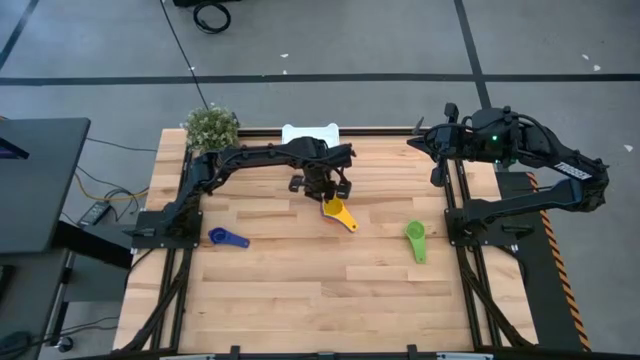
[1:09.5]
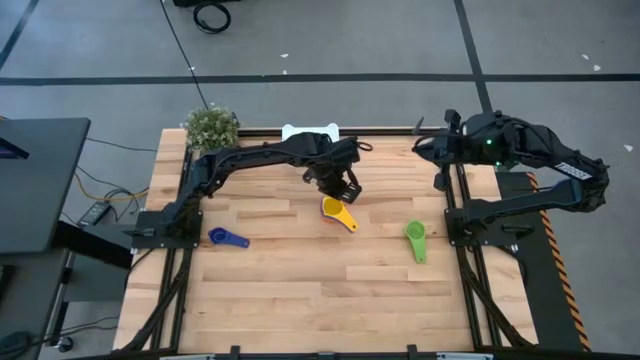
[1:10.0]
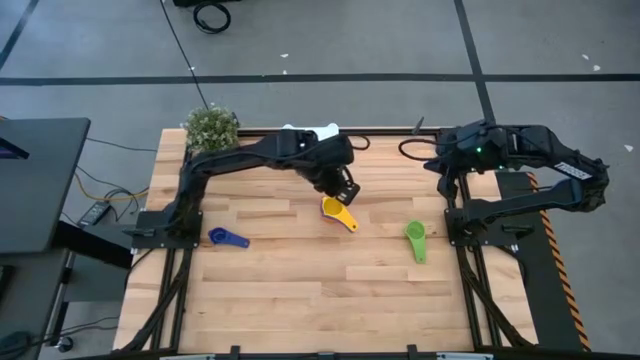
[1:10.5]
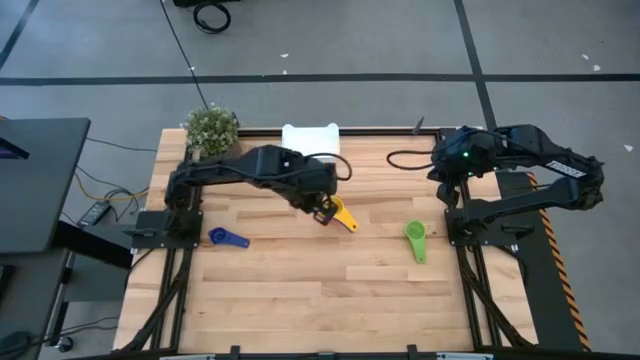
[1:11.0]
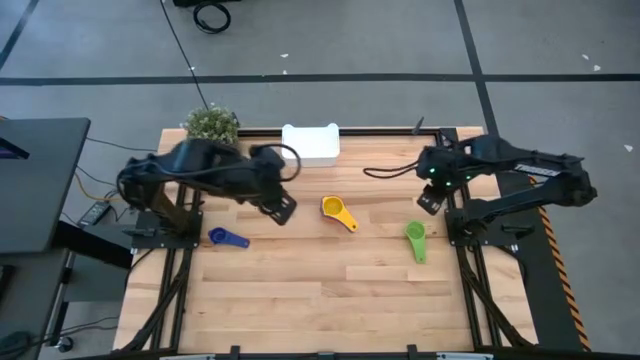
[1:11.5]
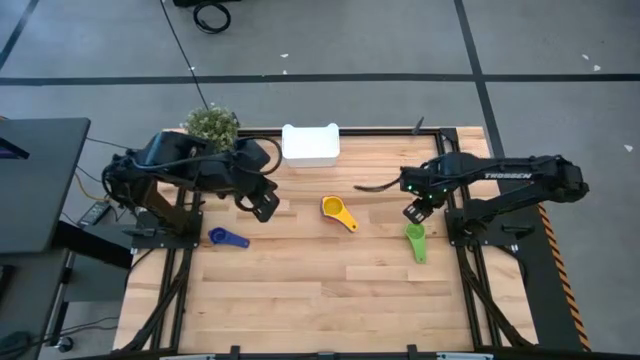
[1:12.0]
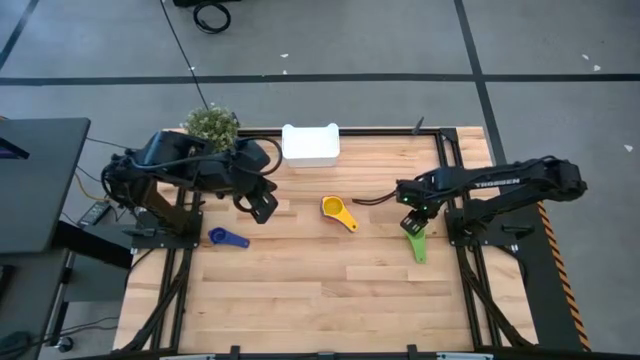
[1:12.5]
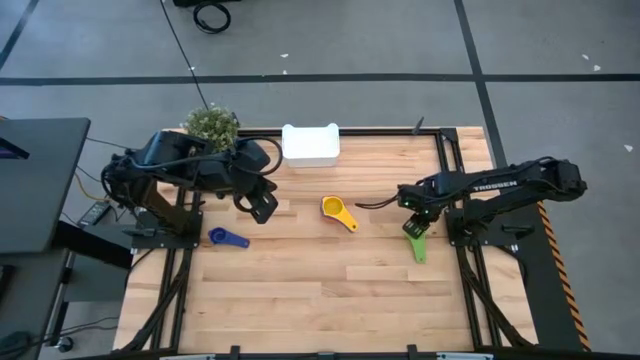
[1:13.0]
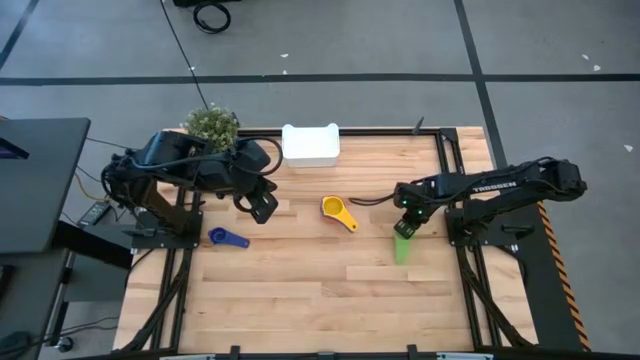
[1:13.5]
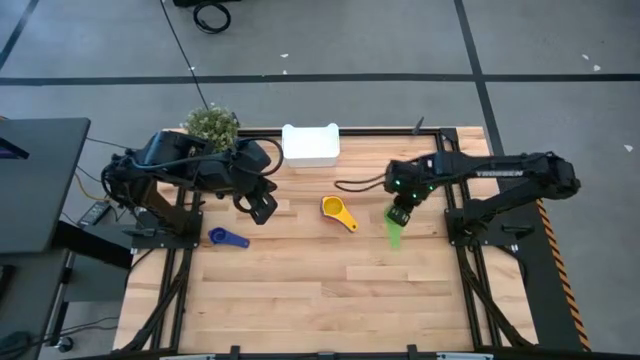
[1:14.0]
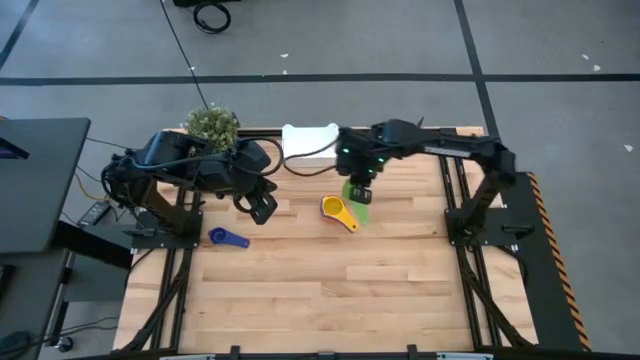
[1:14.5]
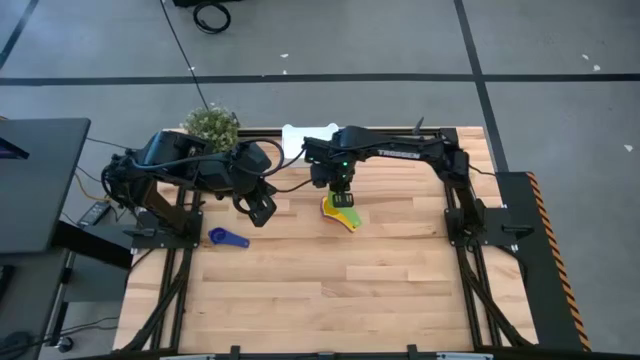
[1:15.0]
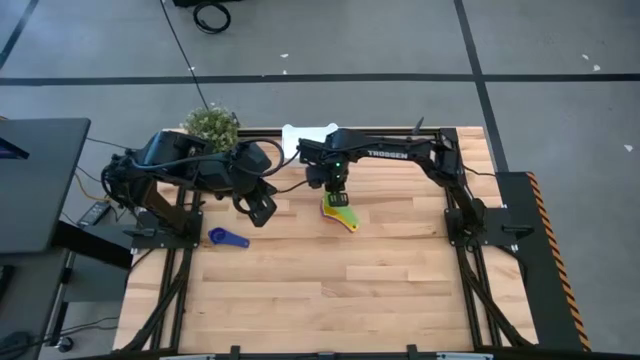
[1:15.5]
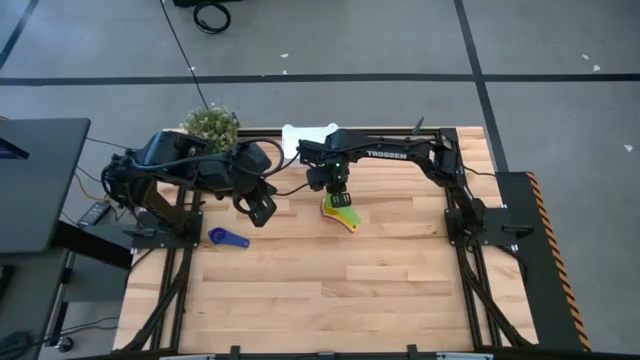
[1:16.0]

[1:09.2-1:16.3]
Task: Nest measuring cups in basket
Stack the green measuring cup on top of the yellow measuring cup

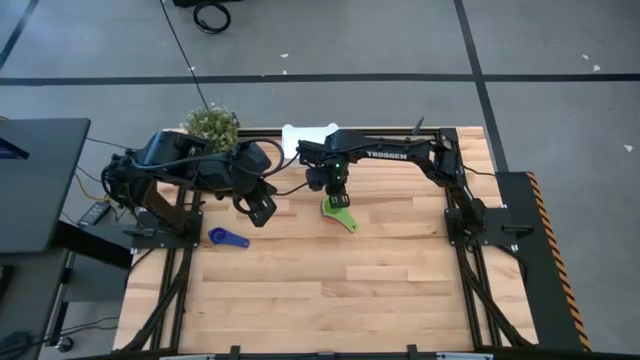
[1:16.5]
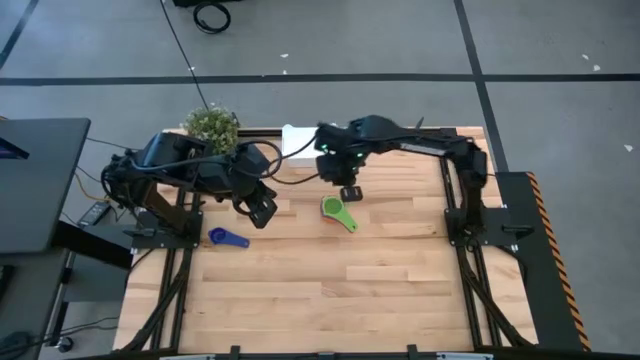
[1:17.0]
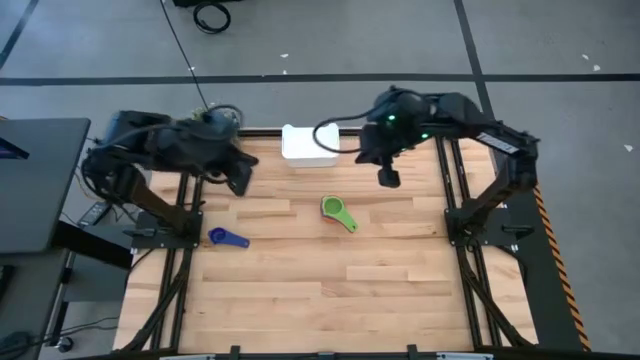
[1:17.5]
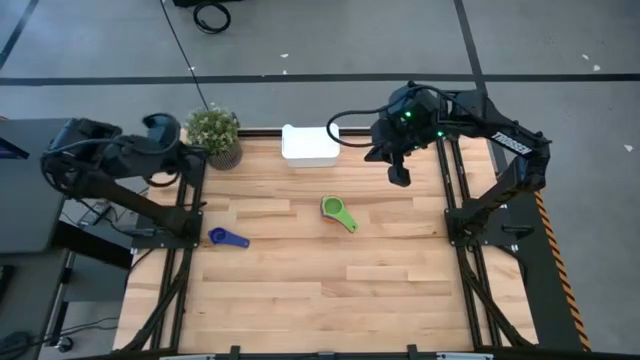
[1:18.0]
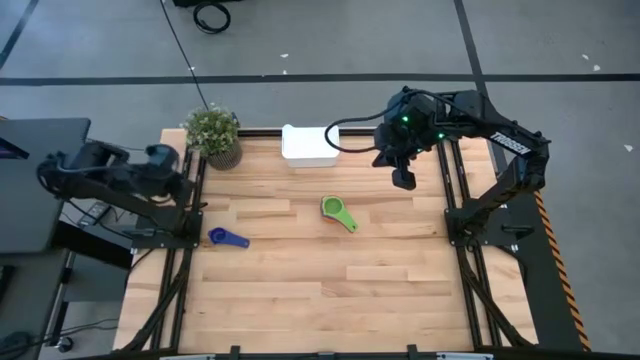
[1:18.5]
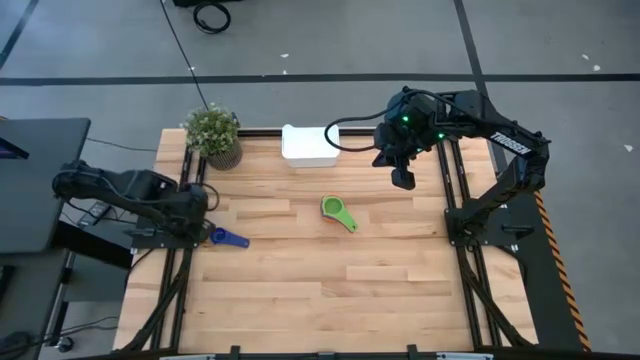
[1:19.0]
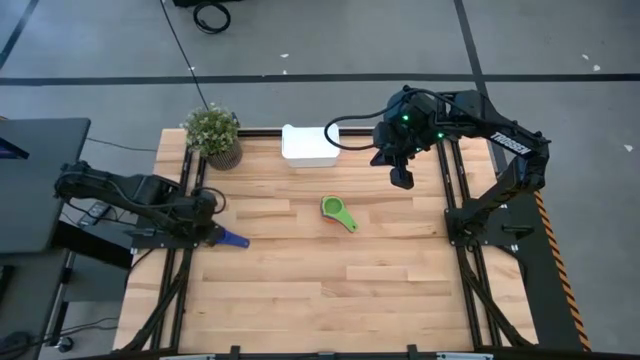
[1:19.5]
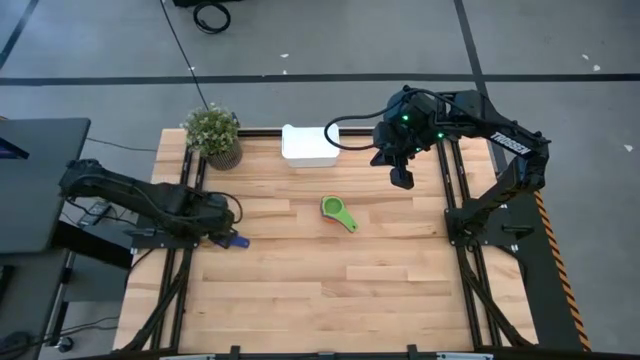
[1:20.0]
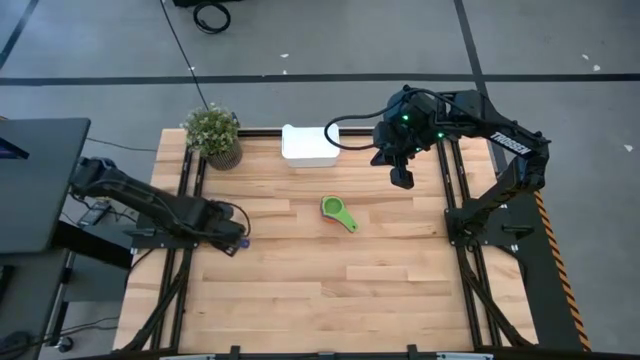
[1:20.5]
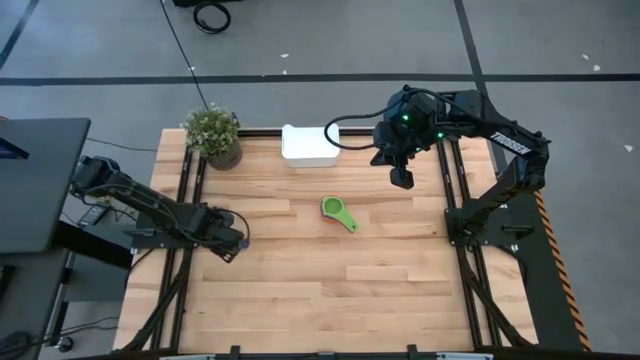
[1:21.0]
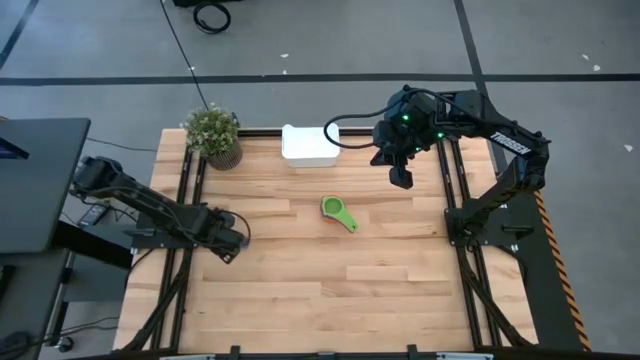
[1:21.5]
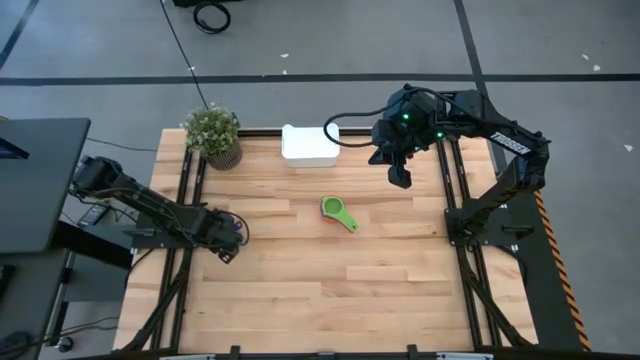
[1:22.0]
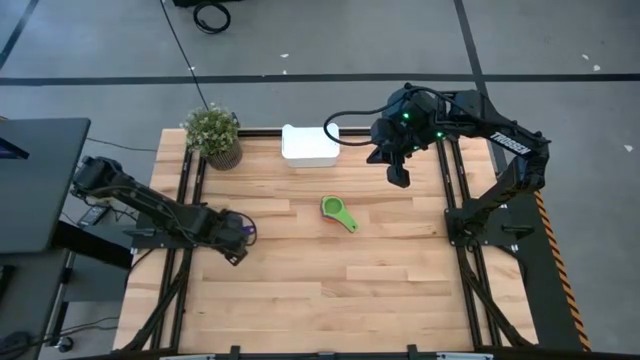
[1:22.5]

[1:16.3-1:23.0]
Stack the violet measuring cup on top of the green measuring cup

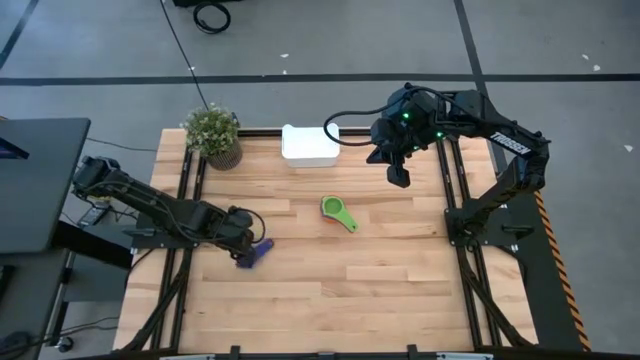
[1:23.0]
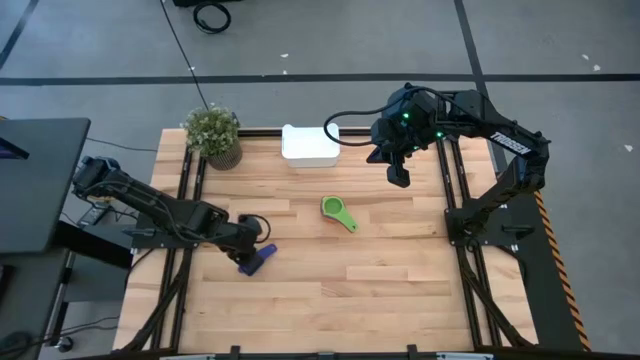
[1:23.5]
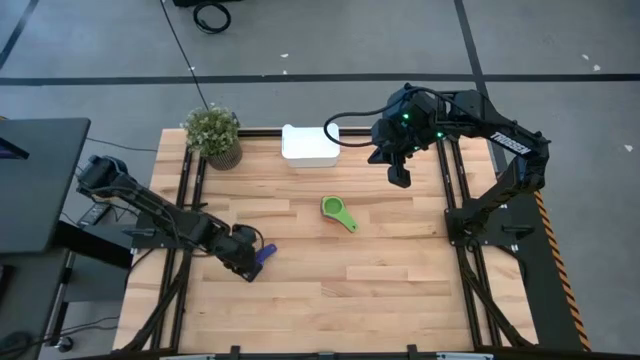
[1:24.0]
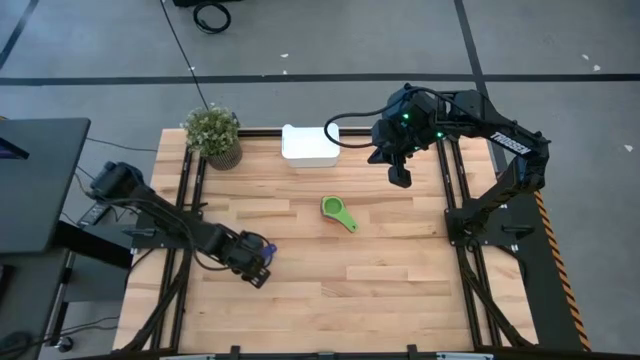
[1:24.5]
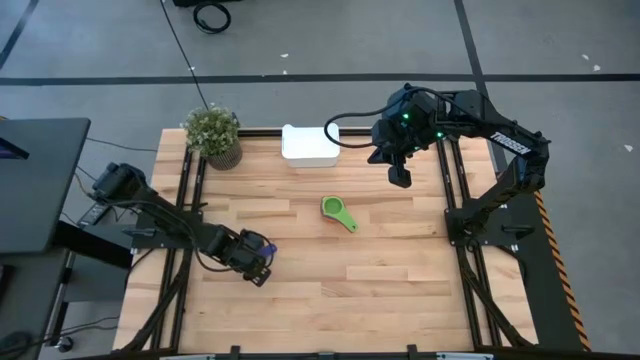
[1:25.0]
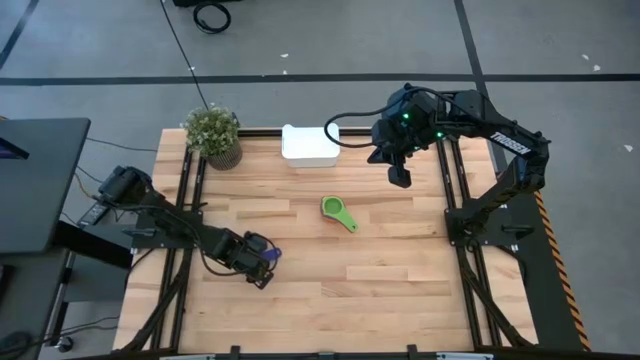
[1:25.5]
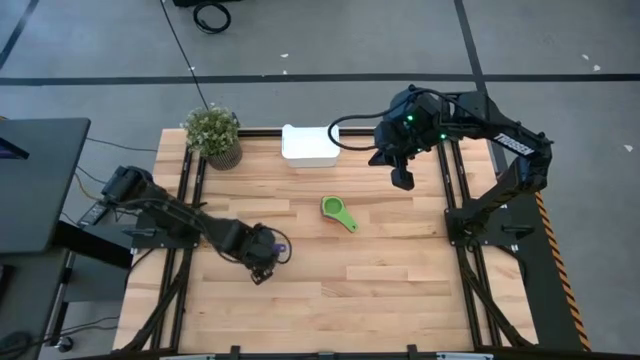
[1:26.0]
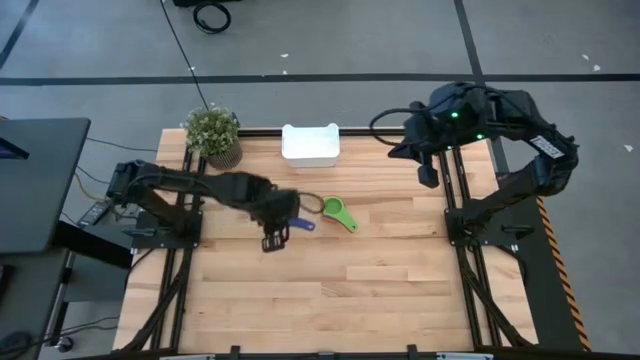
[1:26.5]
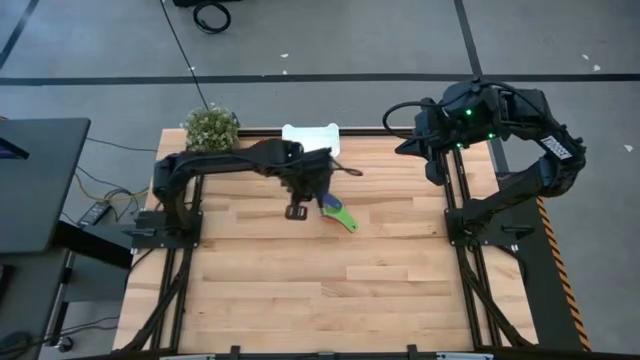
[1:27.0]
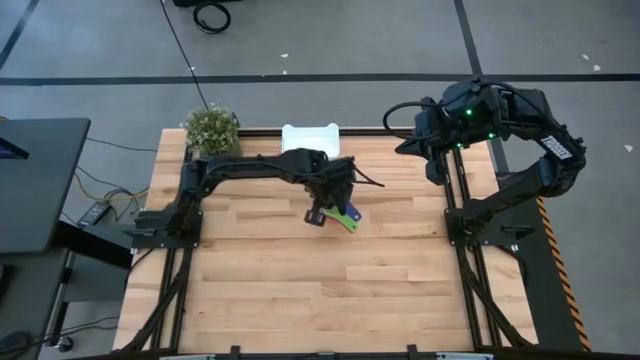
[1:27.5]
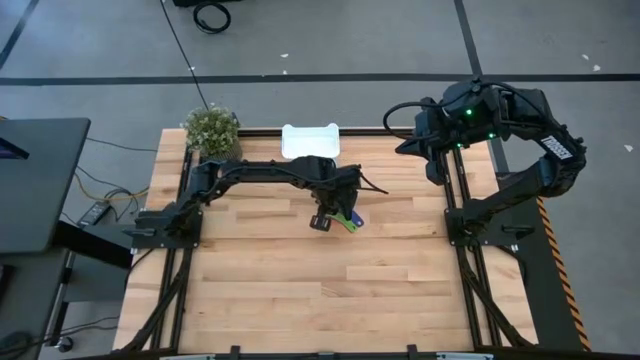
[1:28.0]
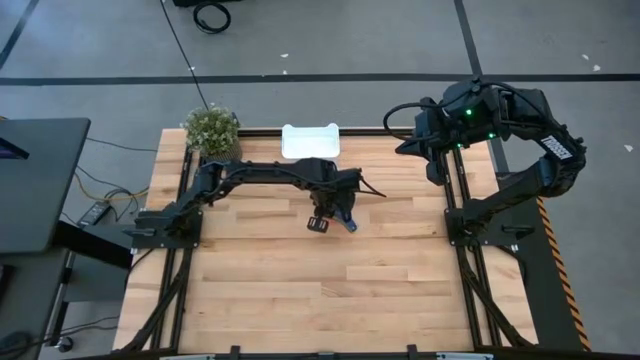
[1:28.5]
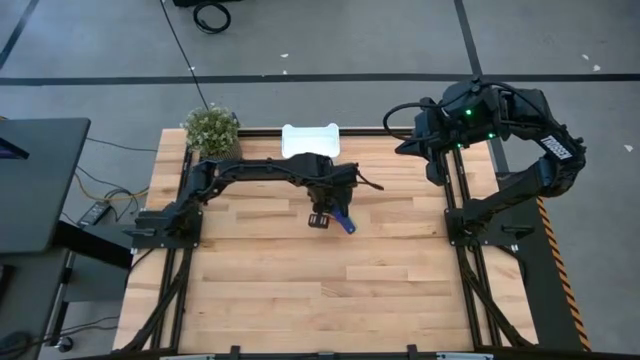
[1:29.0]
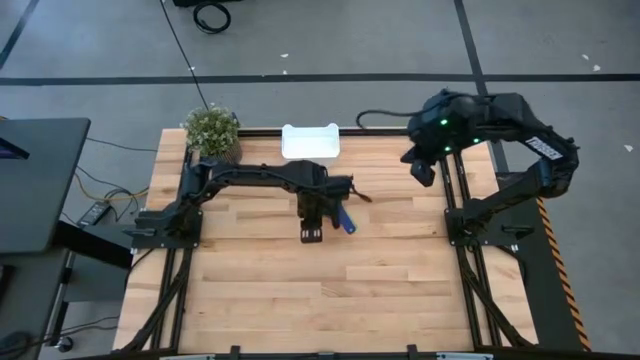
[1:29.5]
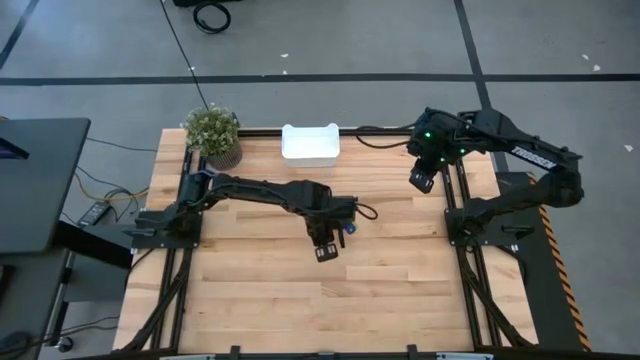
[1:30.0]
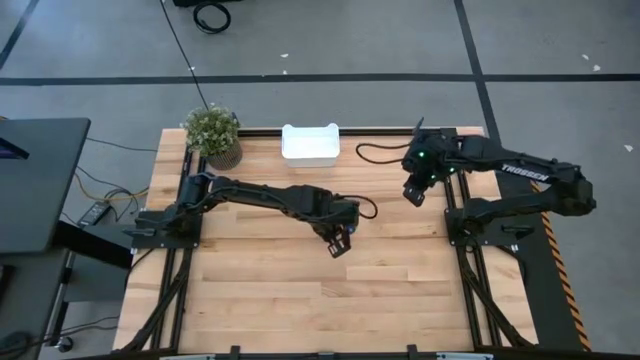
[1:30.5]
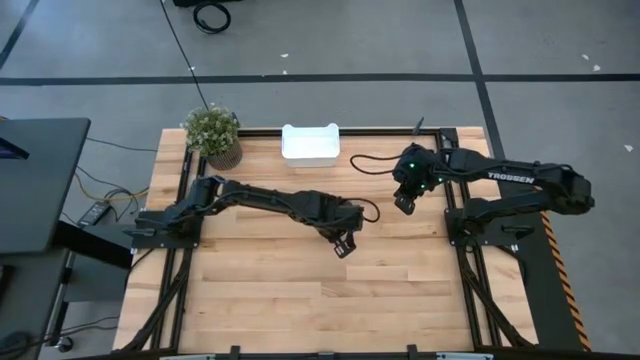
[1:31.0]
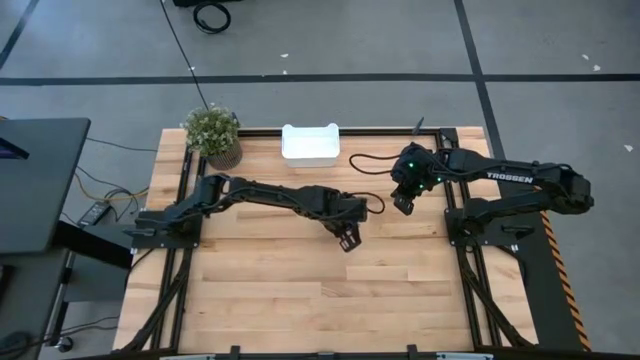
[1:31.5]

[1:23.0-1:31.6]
Stack the violet measuring cup on top of the green measuring cup
